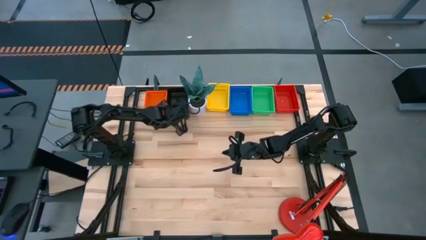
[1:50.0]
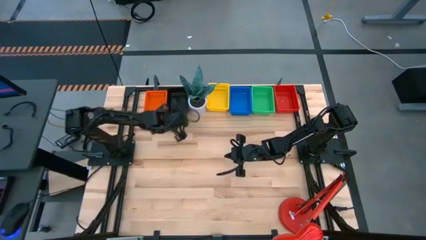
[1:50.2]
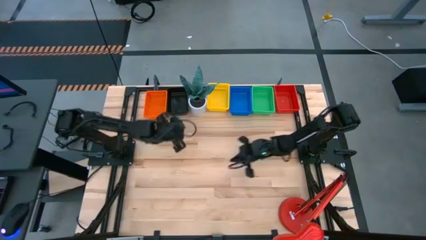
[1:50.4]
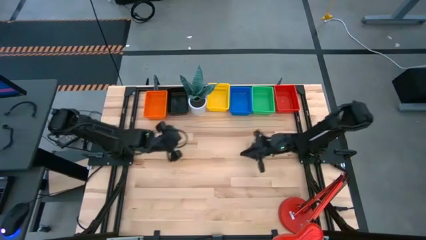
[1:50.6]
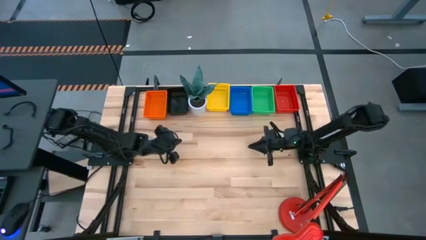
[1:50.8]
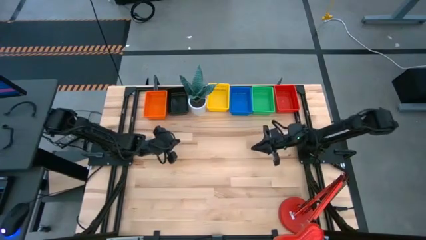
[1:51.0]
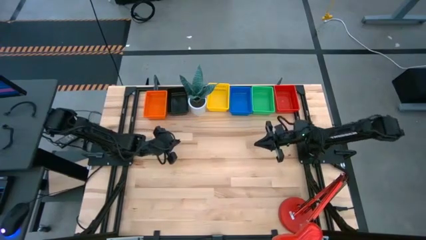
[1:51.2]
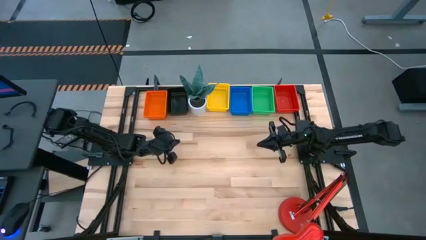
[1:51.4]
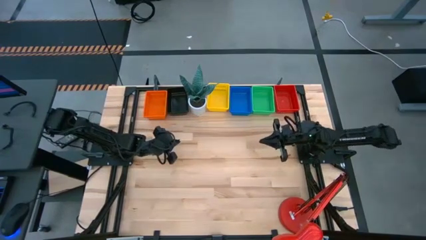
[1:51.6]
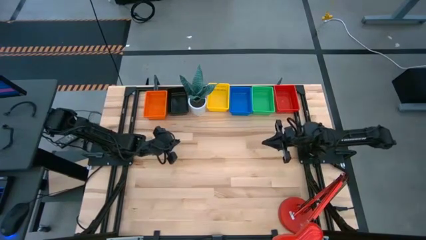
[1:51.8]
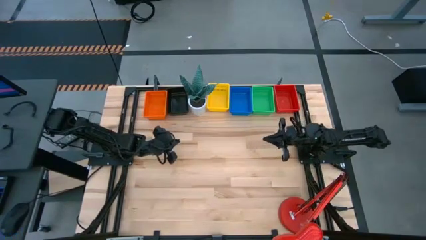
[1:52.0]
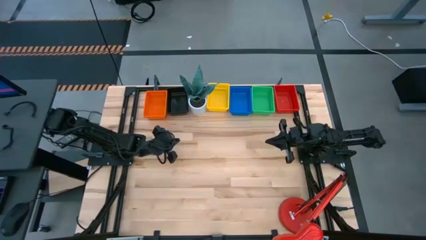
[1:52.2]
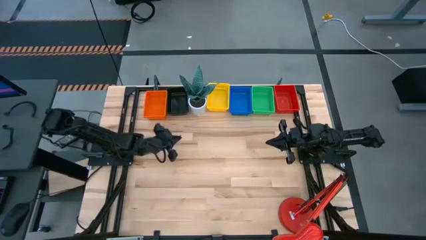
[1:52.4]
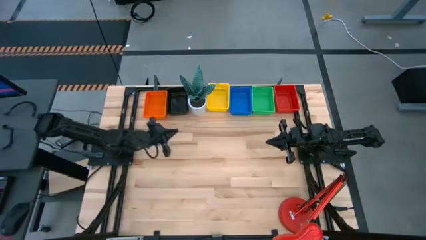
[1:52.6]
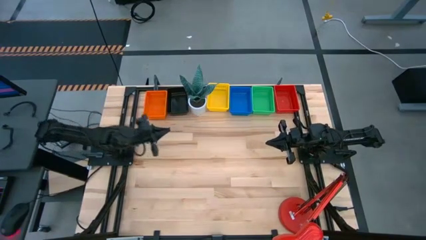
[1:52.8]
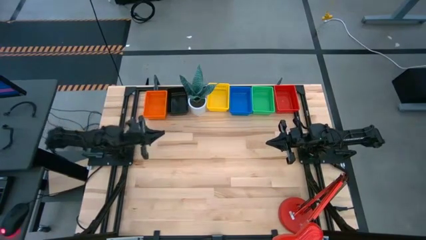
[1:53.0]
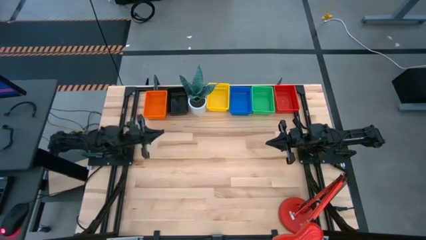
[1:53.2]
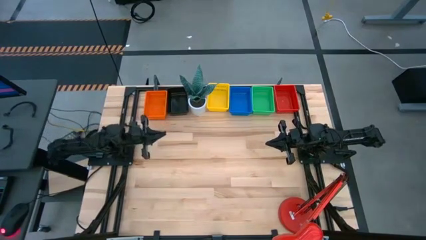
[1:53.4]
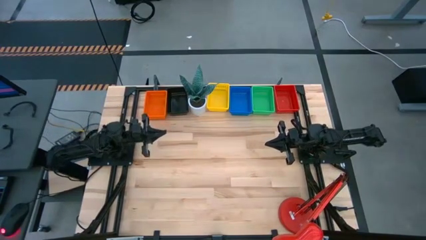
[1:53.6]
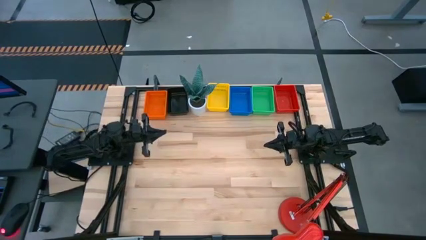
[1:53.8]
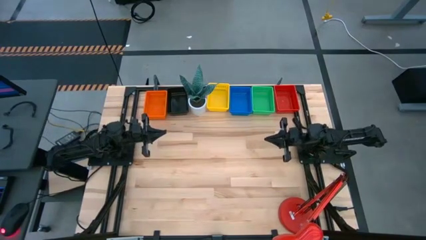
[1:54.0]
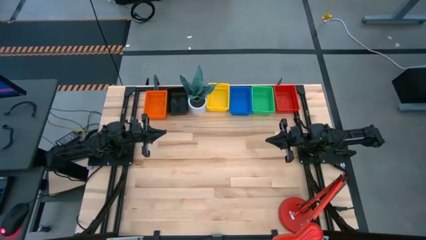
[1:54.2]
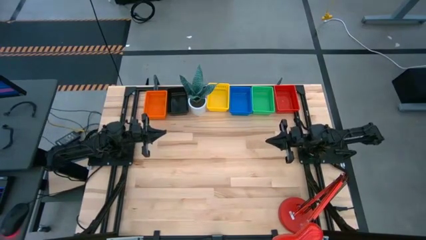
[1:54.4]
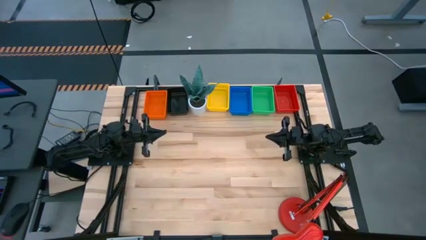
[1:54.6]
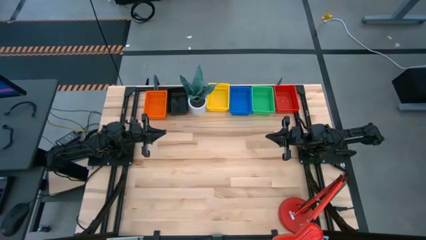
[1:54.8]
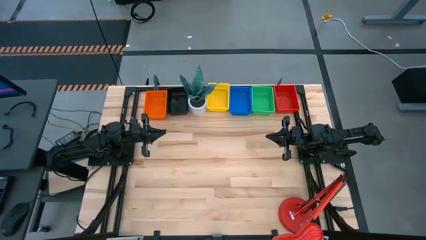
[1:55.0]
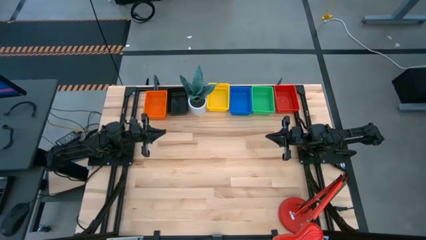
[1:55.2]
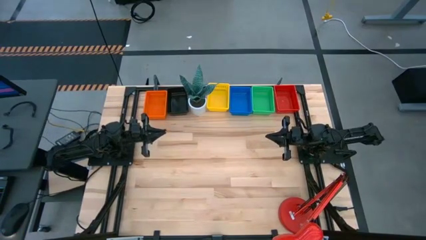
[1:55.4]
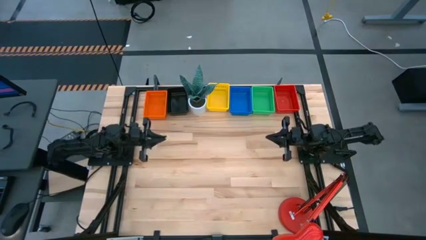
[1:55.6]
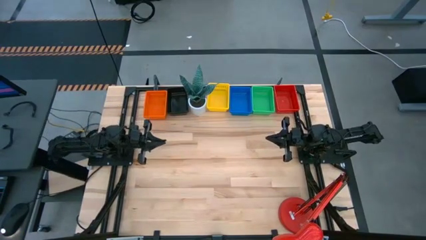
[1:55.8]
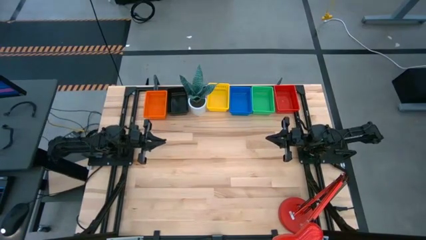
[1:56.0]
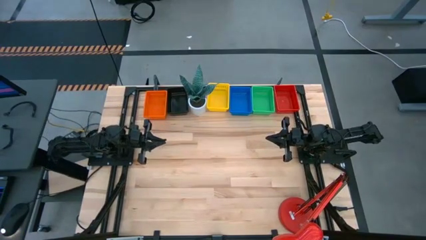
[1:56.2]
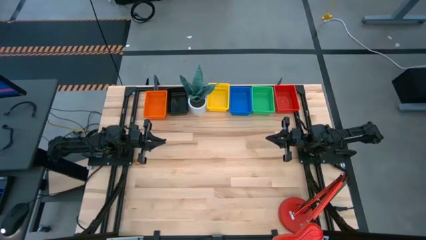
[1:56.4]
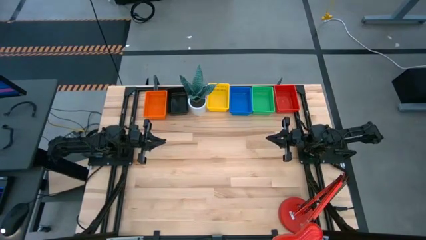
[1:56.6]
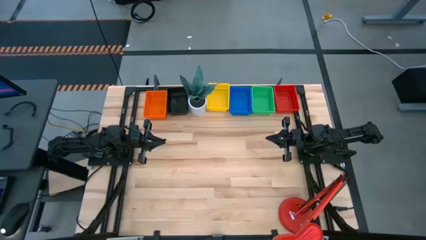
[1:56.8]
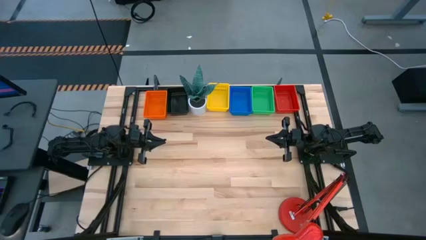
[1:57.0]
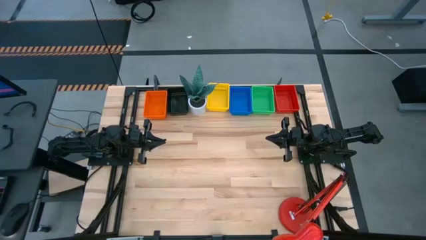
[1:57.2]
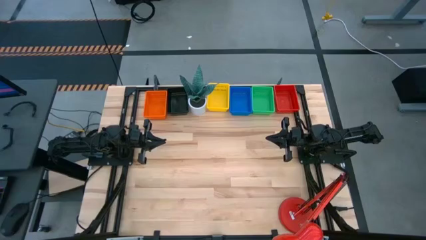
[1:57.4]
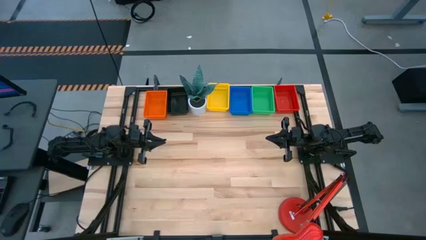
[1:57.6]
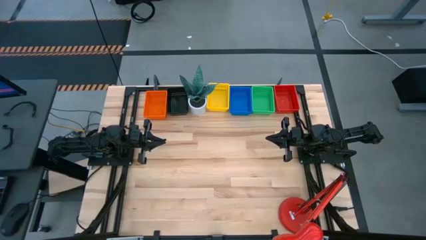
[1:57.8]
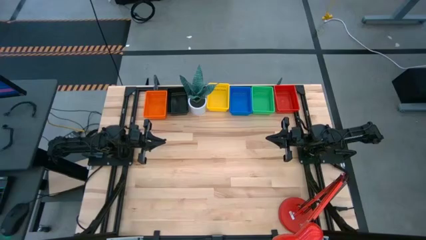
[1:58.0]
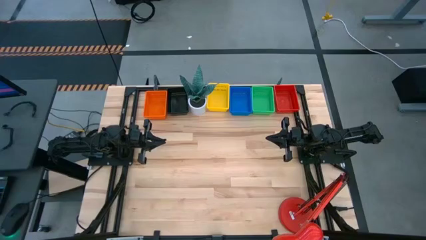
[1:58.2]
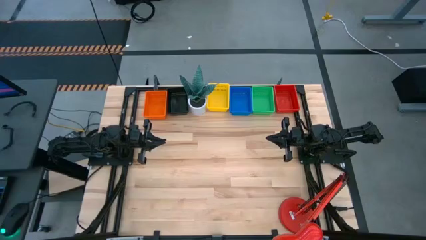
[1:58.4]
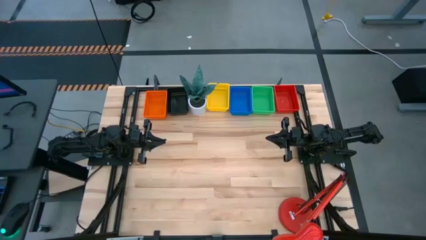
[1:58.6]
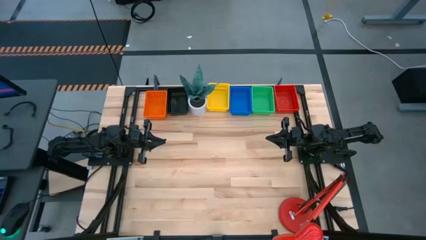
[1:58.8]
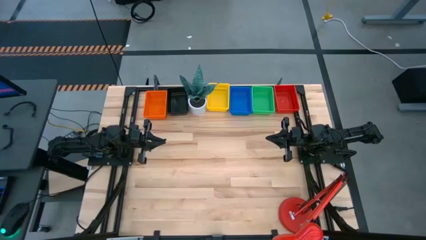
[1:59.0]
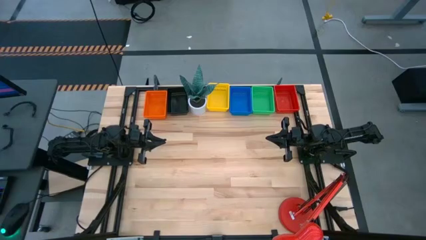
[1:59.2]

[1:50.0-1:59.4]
Return to home position
